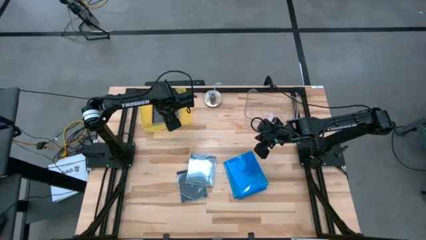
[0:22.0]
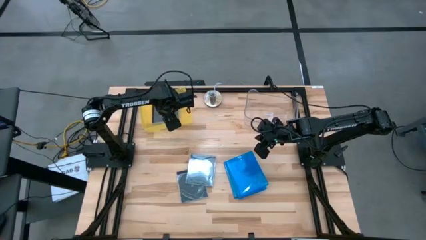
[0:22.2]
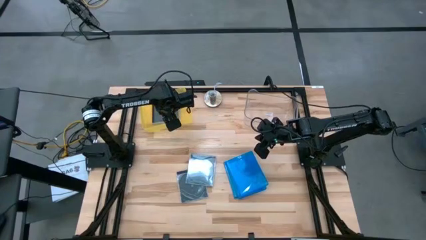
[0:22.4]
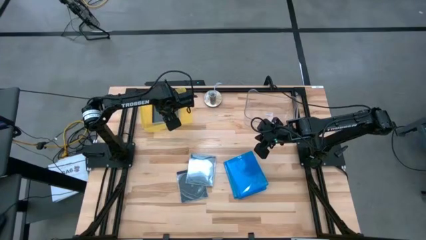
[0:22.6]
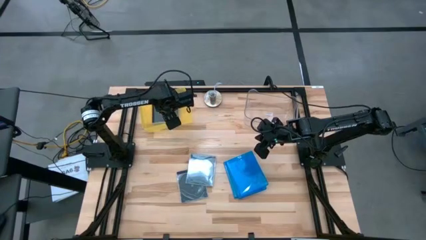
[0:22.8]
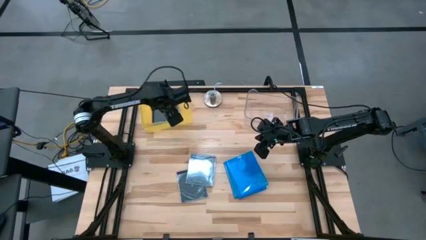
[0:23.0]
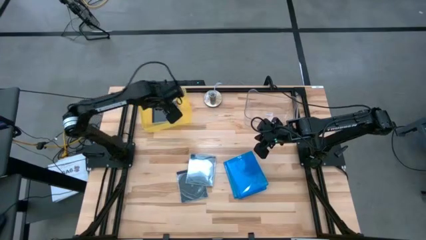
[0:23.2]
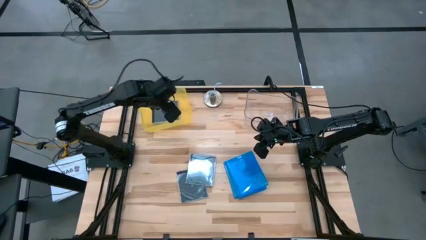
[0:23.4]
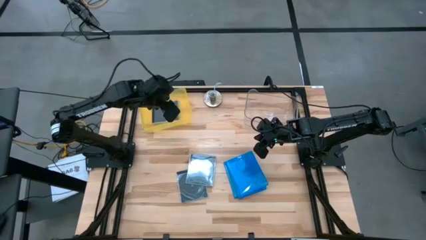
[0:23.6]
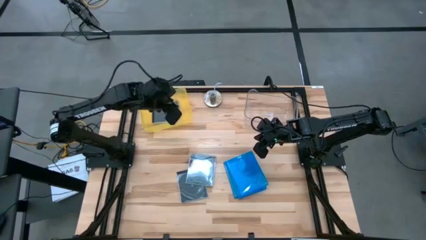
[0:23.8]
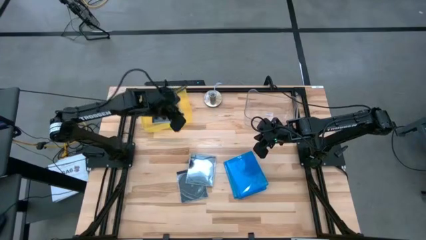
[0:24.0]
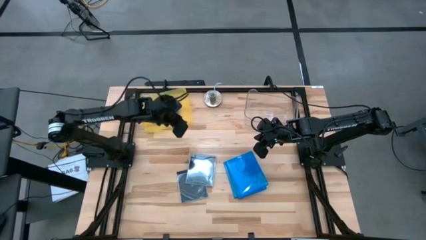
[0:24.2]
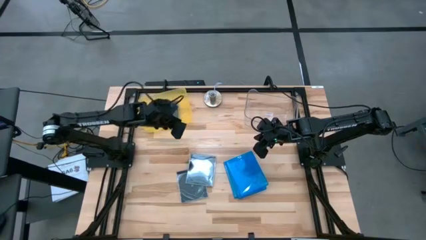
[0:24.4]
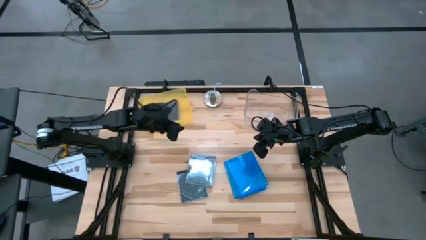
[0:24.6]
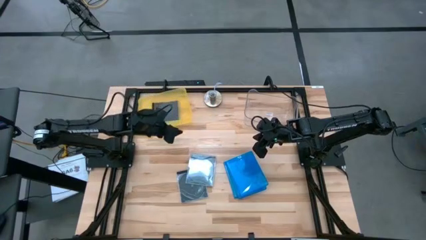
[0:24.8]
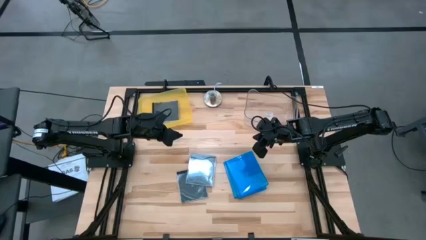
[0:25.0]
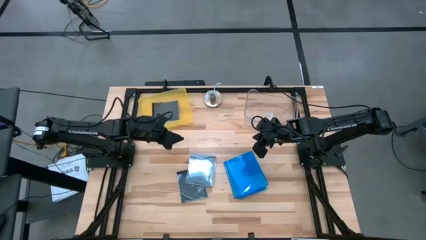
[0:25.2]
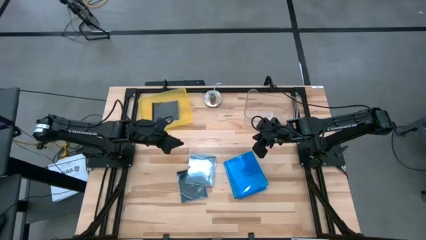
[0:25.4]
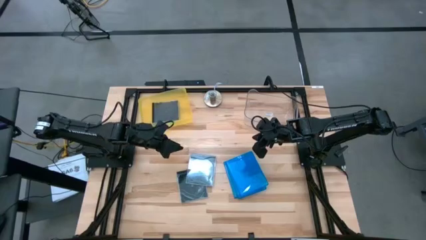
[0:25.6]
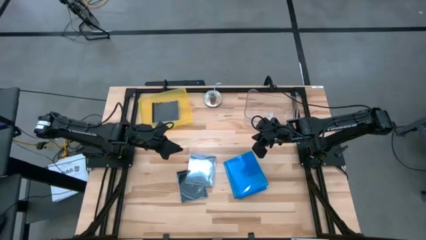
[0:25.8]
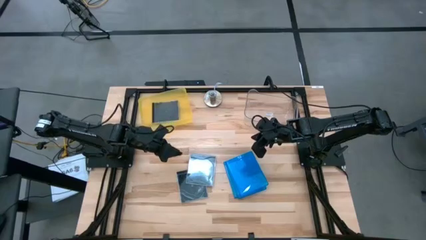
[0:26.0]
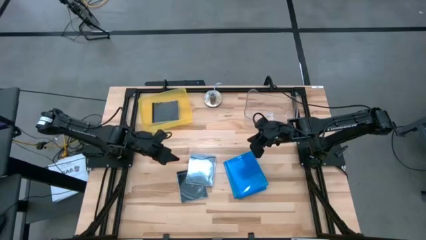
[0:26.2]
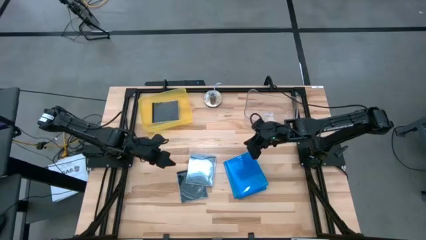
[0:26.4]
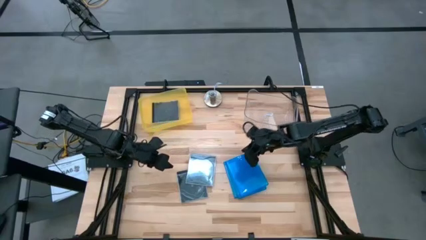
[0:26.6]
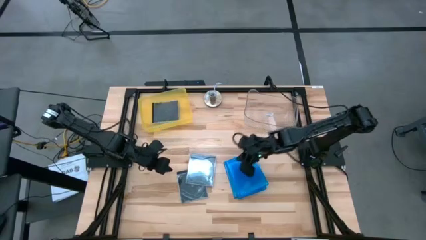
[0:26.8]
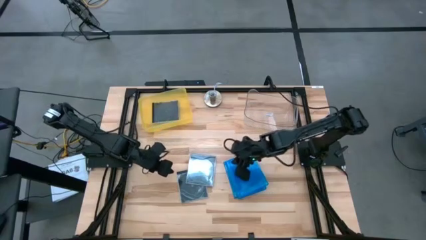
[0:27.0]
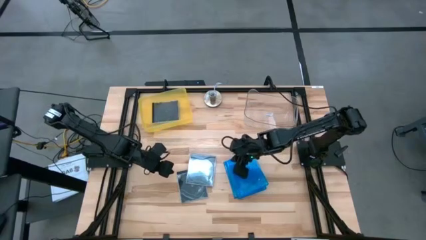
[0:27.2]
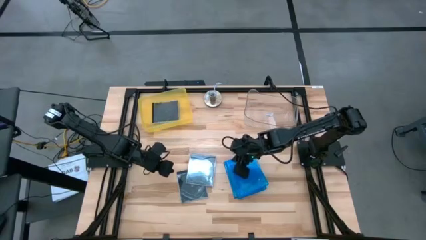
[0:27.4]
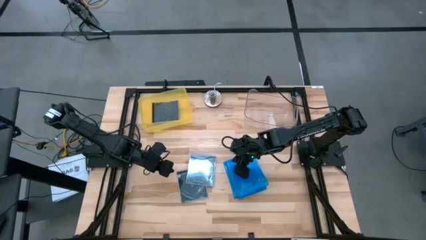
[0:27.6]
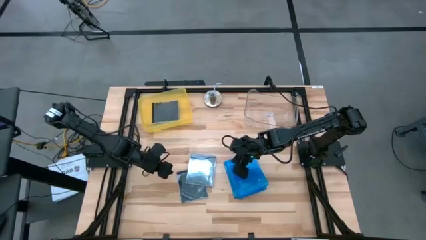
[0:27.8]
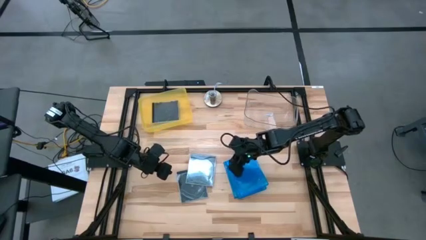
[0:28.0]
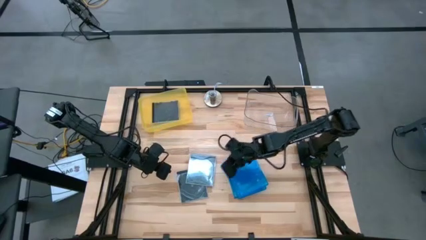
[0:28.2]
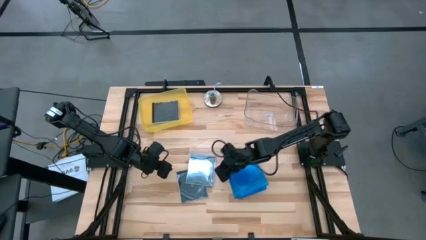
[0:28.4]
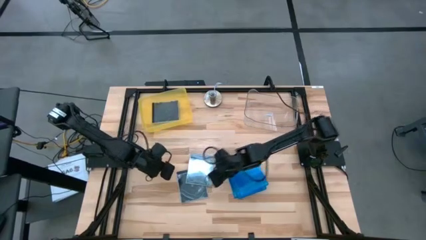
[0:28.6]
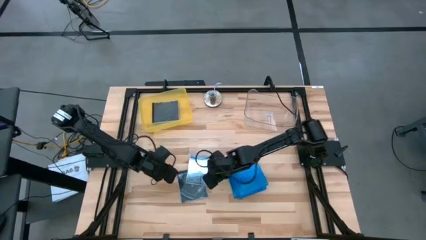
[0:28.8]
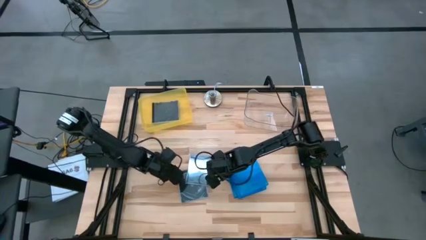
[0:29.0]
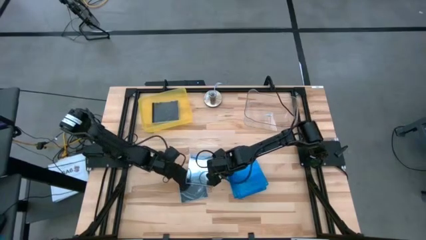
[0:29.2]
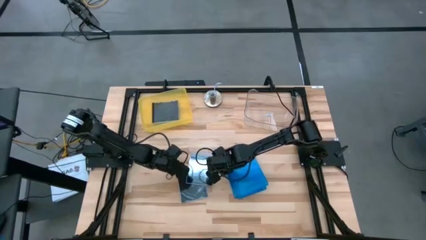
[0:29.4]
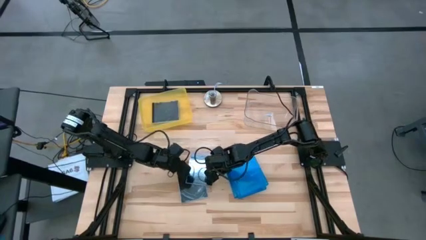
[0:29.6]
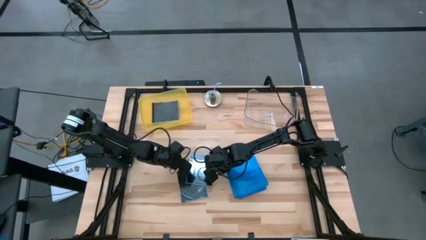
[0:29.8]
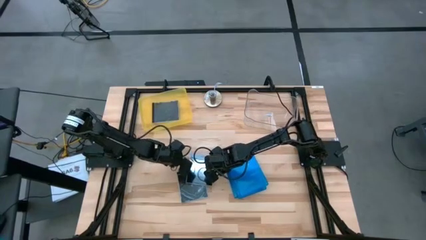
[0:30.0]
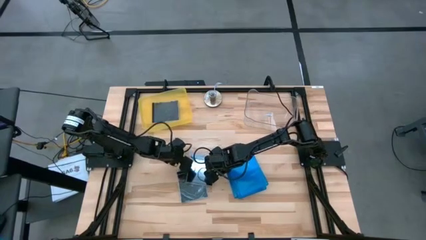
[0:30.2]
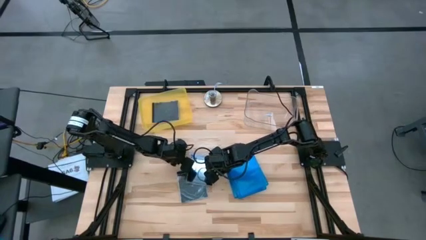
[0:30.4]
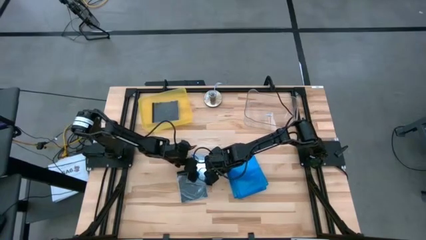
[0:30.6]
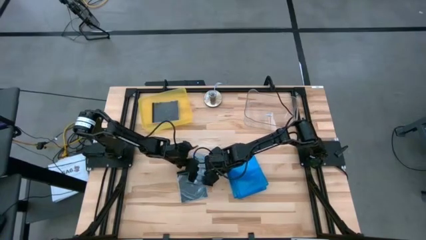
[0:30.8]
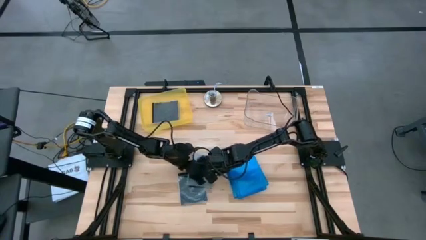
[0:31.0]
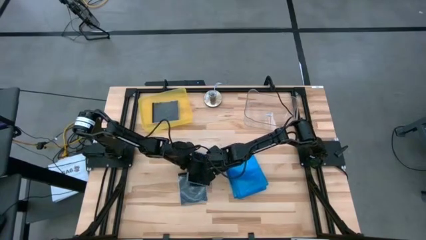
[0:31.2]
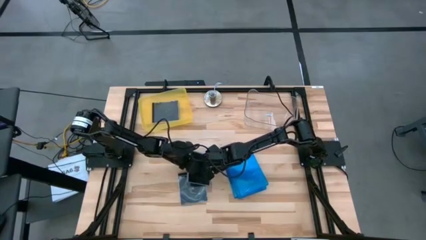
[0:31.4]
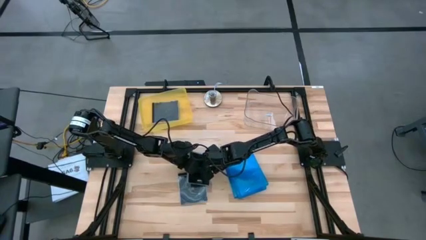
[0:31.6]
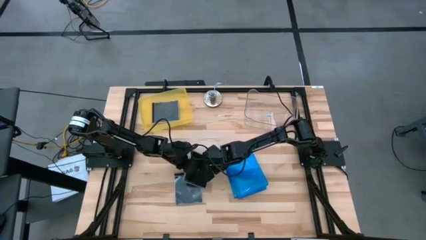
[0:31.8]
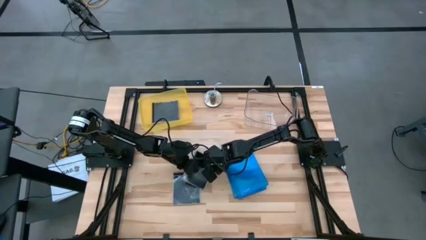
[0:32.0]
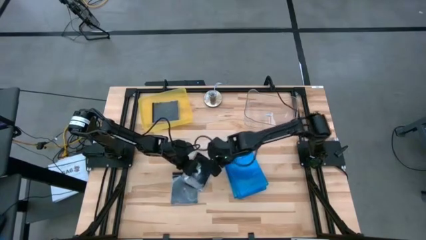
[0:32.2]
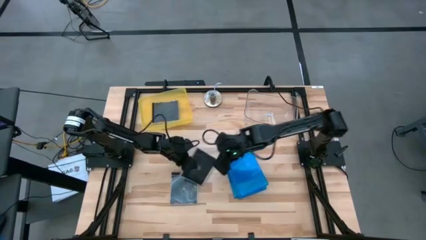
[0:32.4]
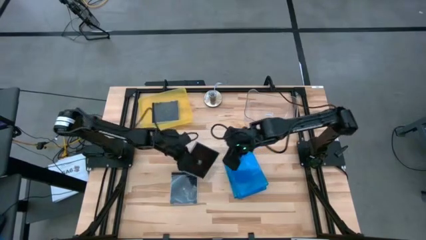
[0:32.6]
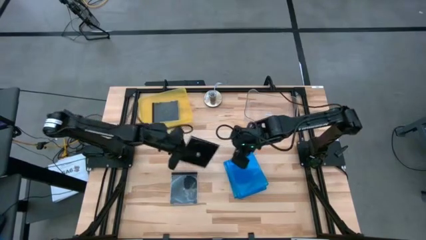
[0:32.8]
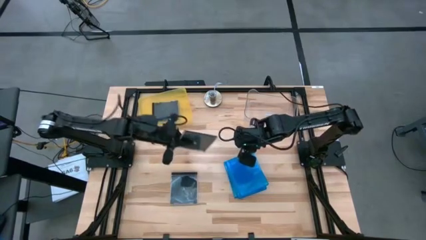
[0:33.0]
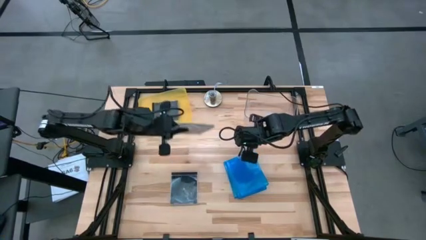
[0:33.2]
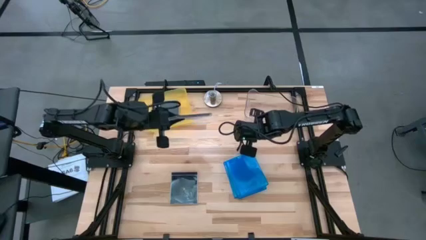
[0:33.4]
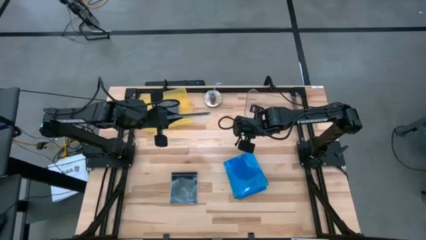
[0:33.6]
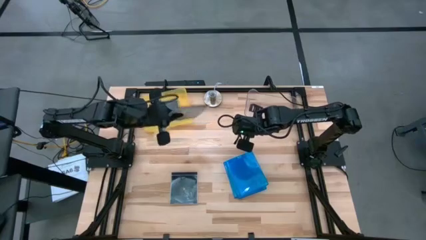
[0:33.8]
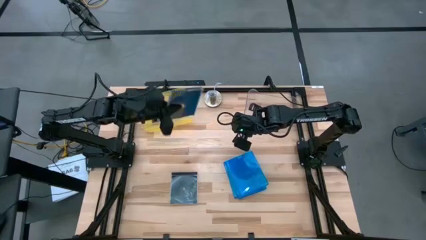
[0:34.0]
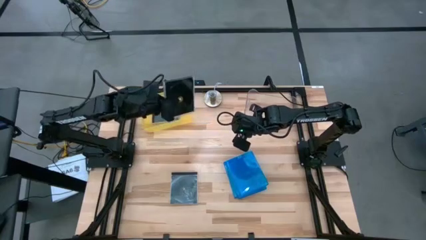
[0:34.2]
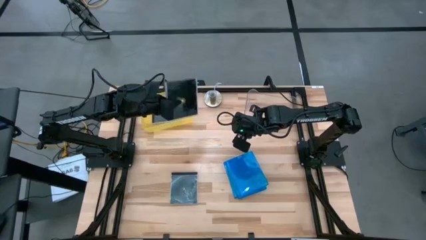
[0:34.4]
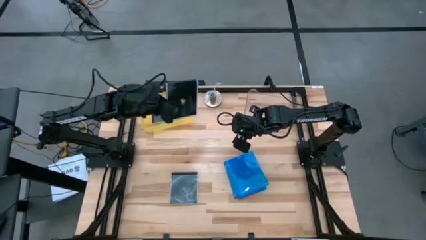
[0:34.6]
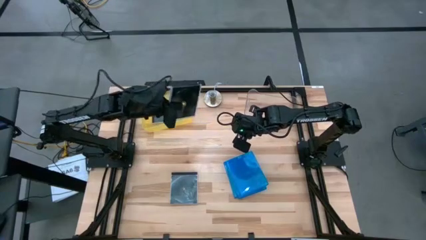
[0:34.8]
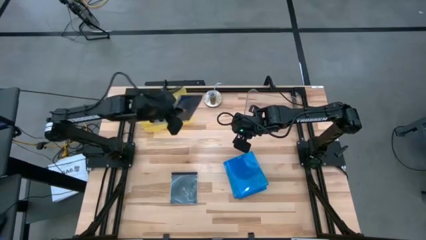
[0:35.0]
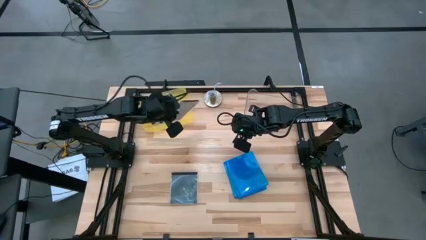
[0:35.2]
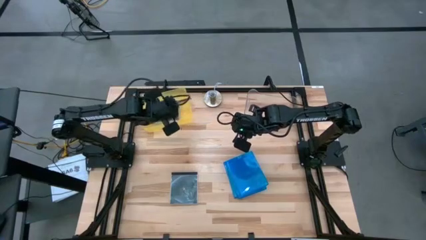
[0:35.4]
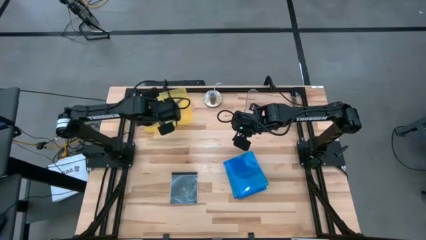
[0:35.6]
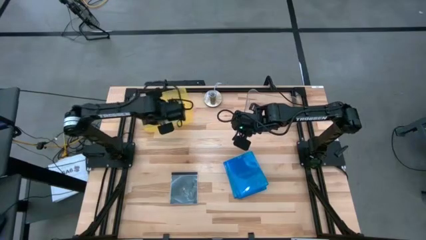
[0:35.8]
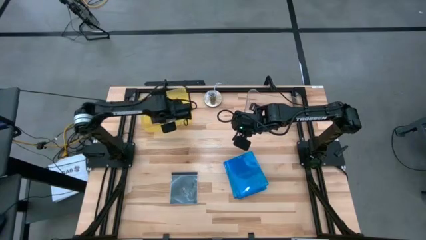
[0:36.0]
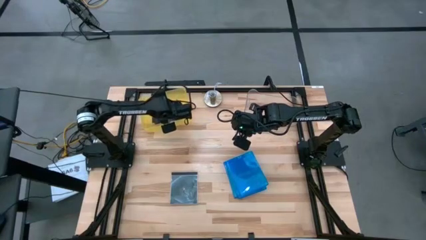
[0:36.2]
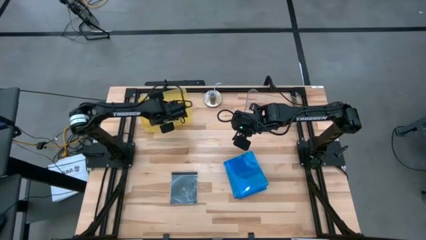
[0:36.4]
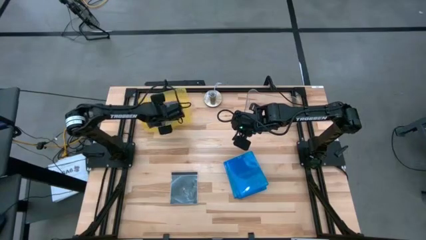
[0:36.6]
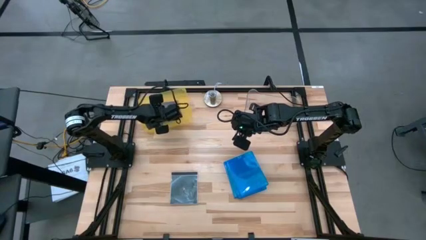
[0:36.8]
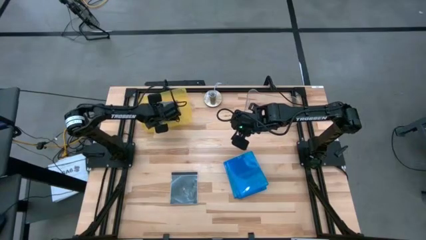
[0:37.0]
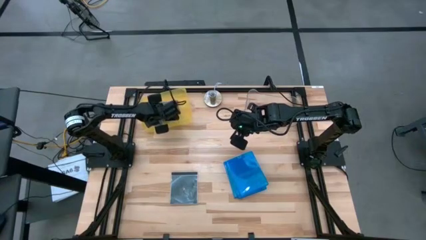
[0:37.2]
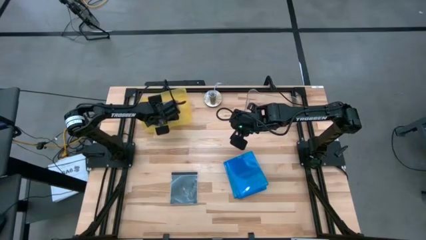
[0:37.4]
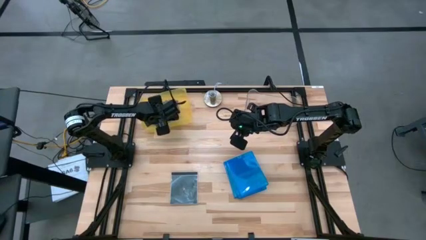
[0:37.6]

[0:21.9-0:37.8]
Task: Pick & place jewel cases by type
Put the black CD case into the yellow bin
